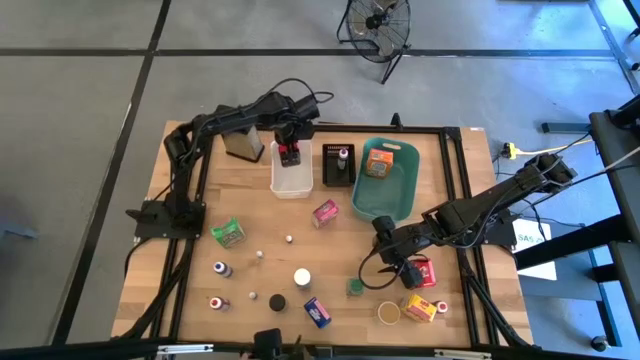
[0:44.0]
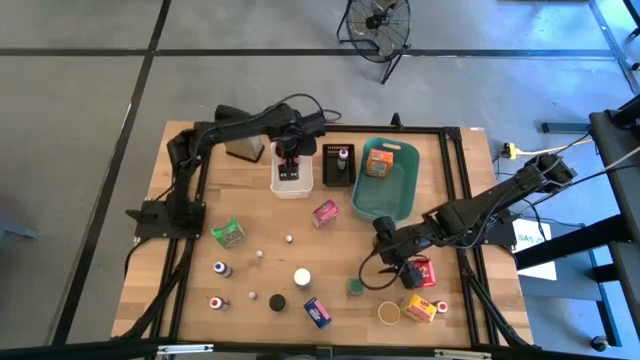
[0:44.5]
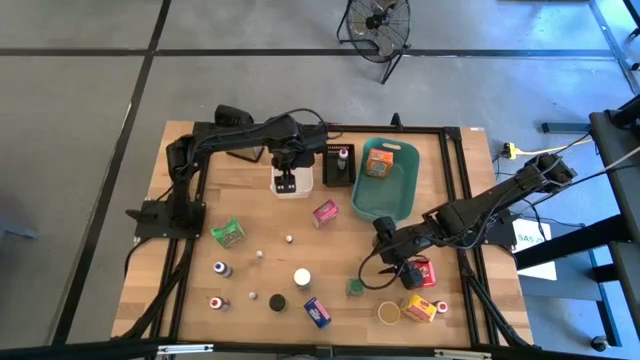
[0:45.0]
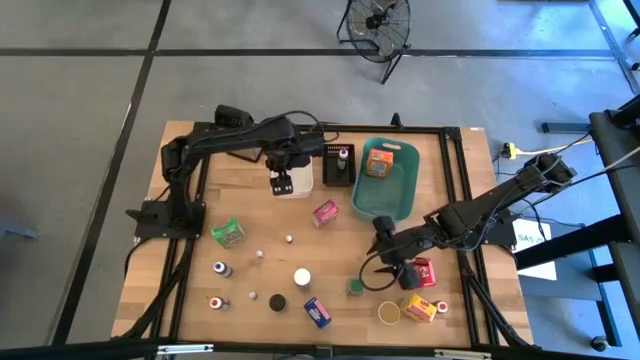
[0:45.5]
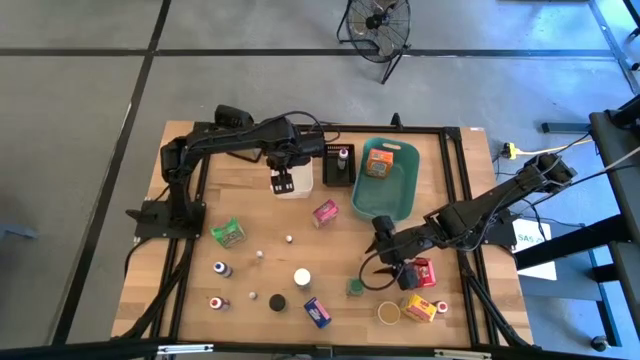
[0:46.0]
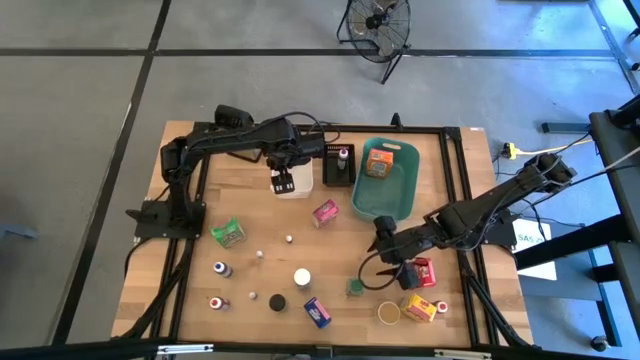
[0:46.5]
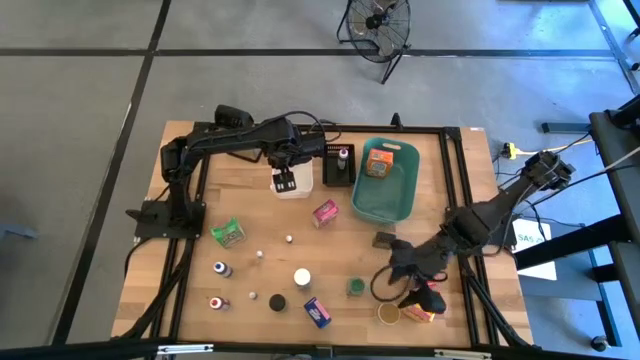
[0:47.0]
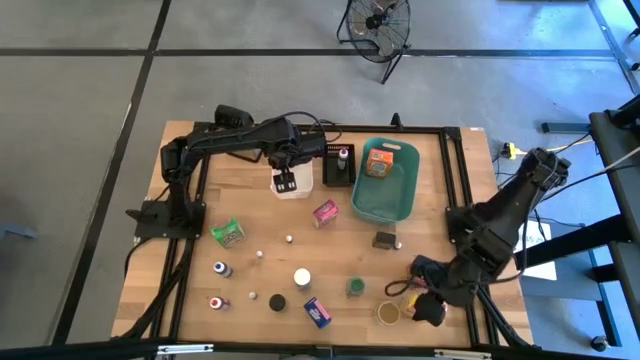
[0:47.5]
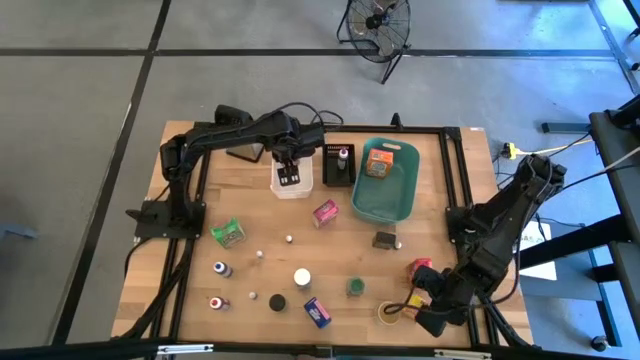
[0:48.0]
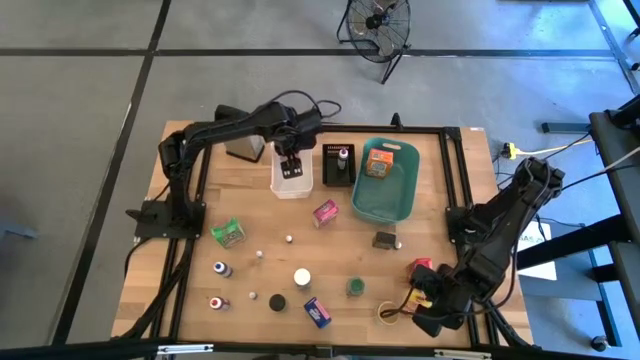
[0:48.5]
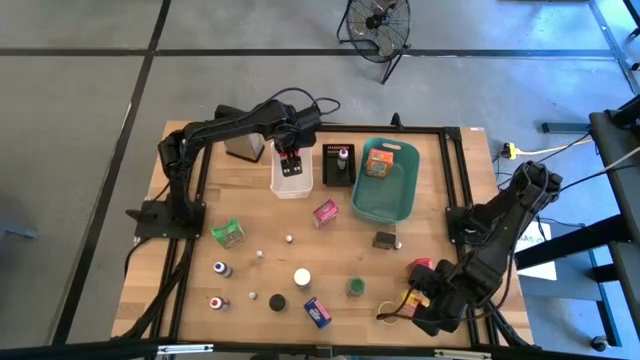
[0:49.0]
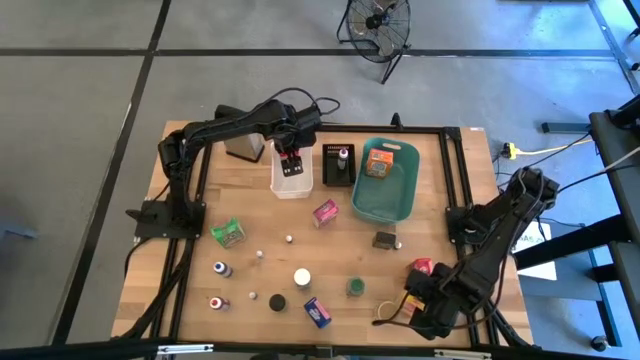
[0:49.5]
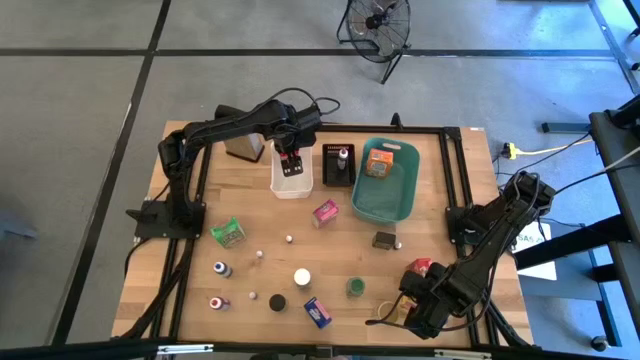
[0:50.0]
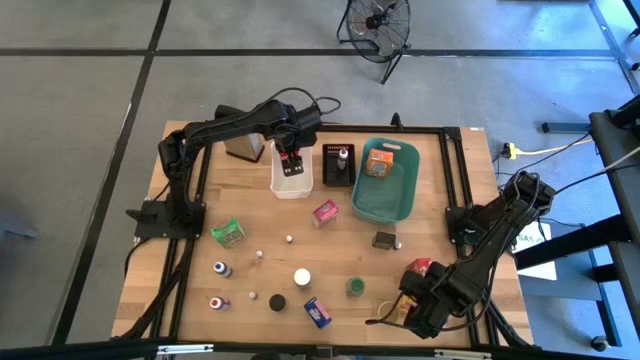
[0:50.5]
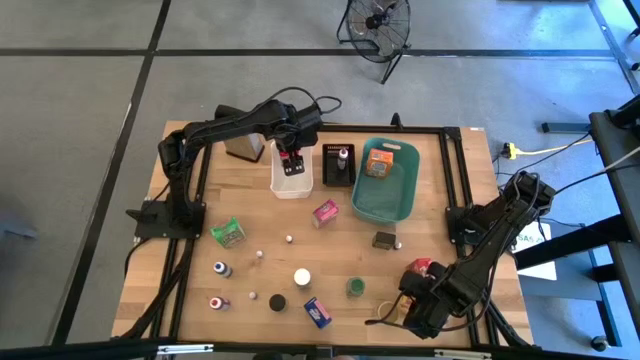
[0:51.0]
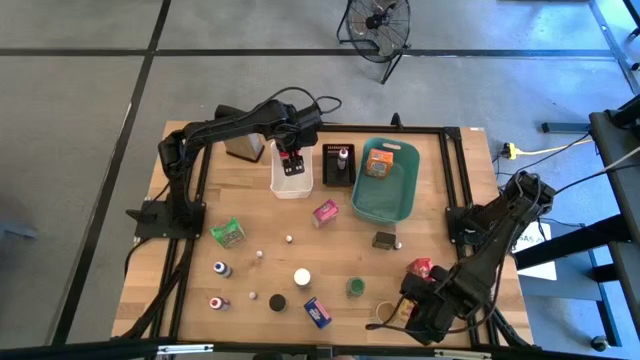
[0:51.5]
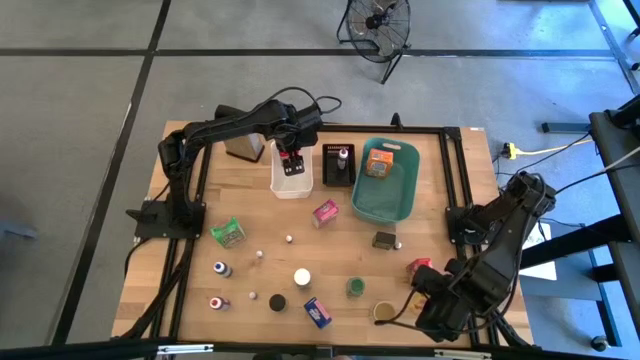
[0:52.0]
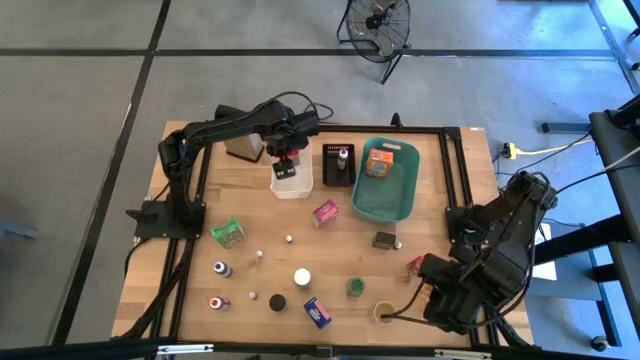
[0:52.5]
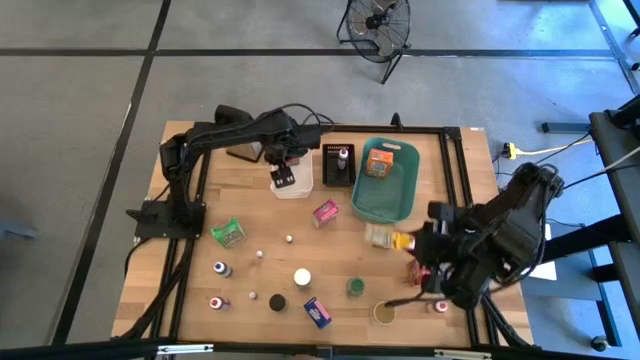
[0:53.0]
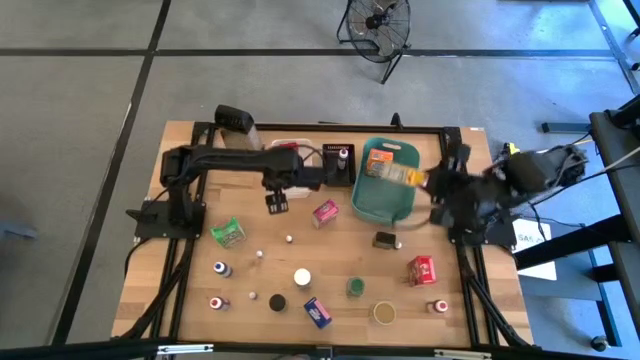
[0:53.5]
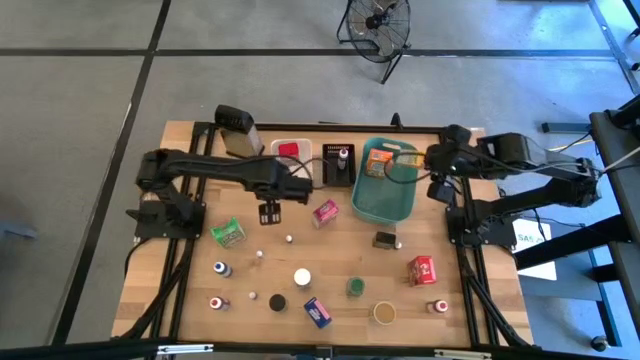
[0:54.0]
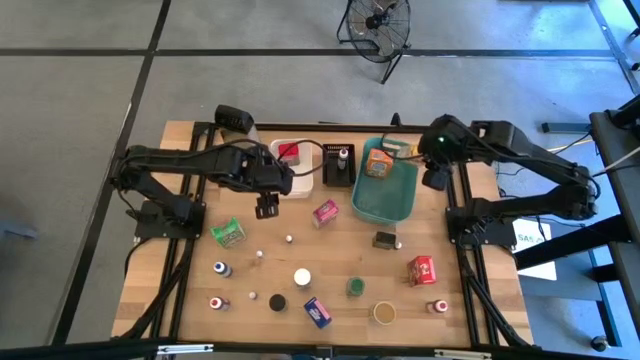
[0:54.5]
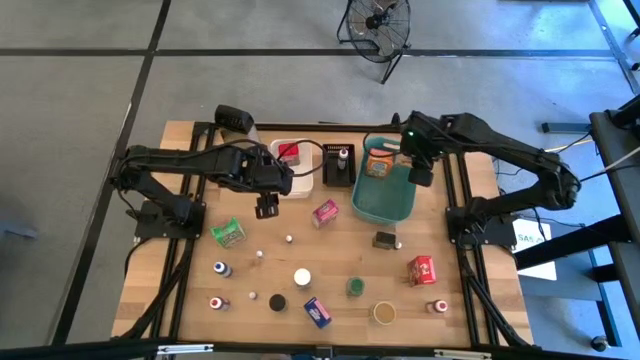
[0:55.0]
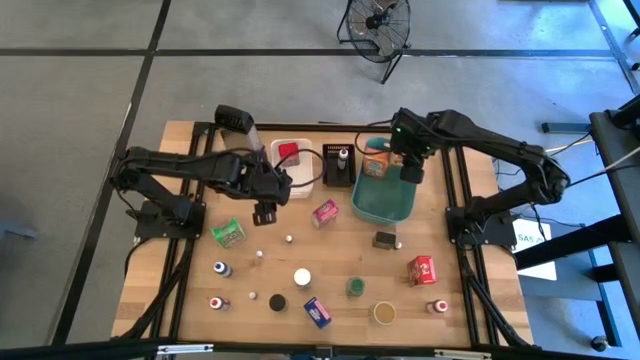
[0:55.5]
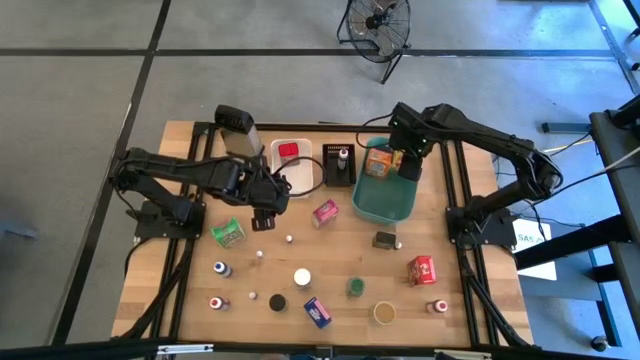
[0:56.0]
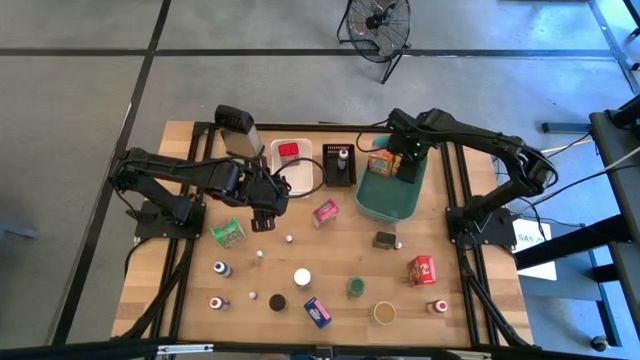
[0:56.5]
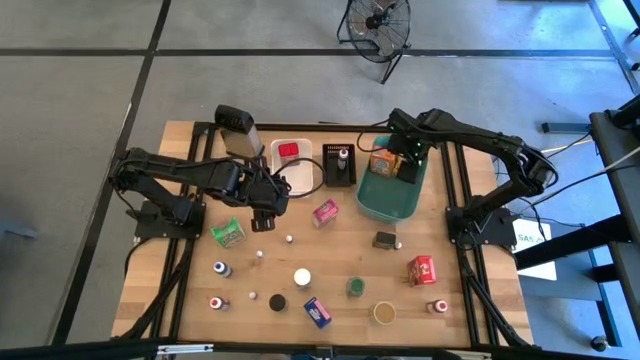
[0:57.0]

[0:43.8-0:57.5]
Task: Pick & Place Kitchen Items
Put the yellow cereal box into the green bin

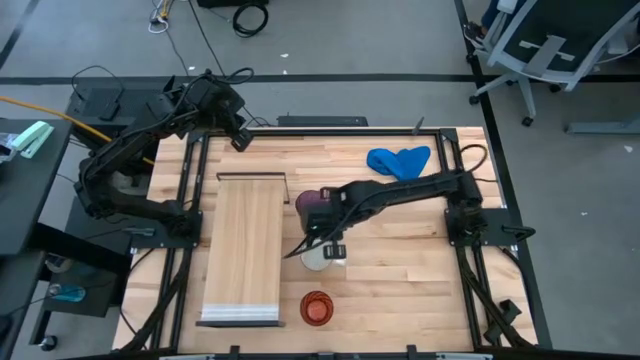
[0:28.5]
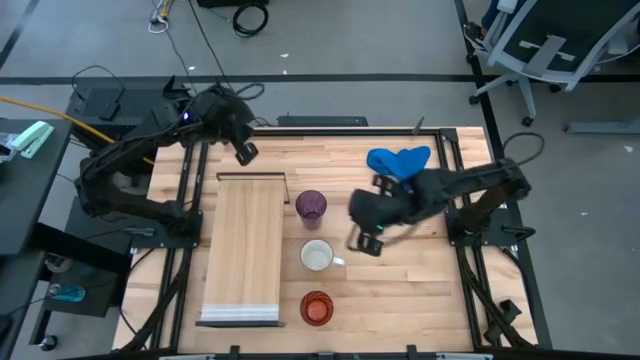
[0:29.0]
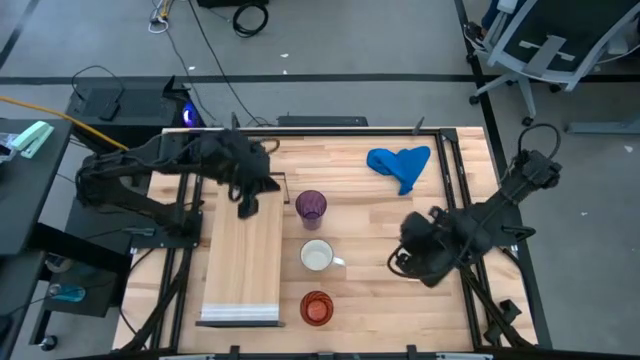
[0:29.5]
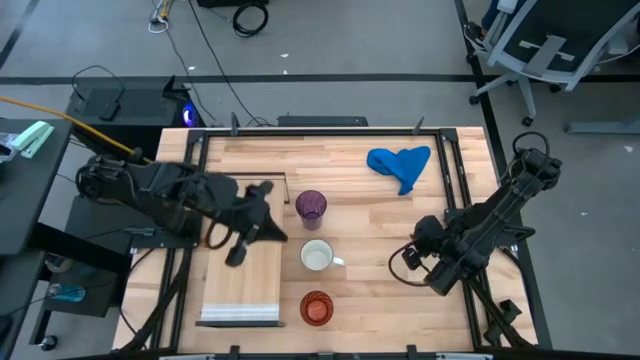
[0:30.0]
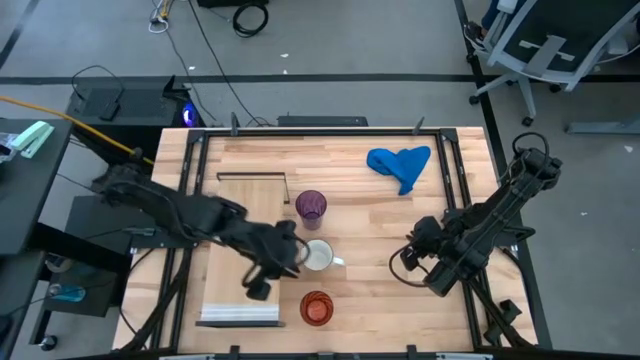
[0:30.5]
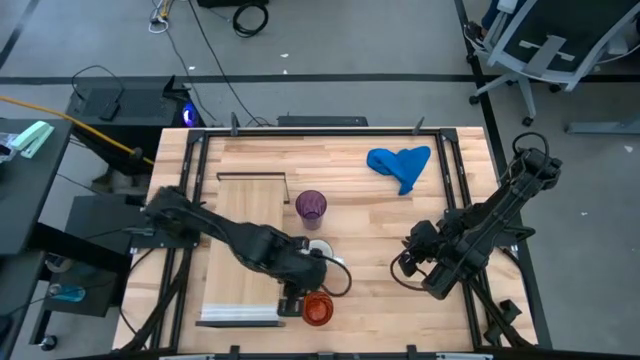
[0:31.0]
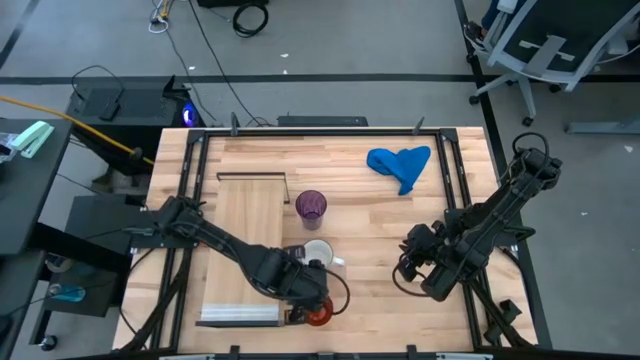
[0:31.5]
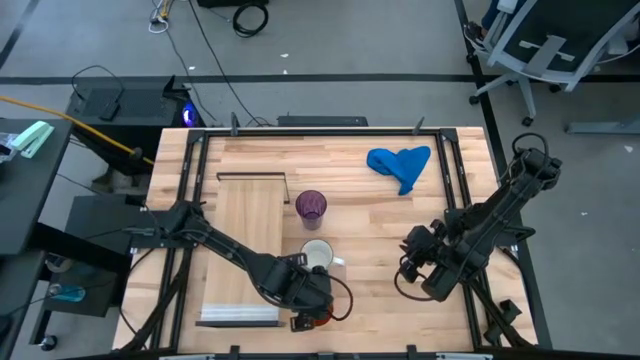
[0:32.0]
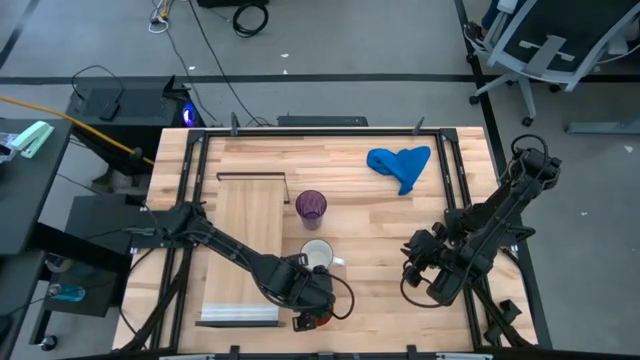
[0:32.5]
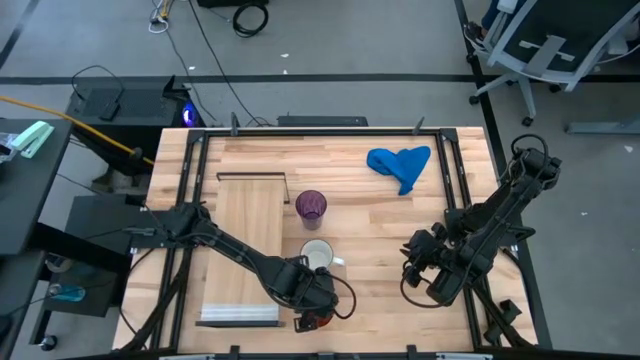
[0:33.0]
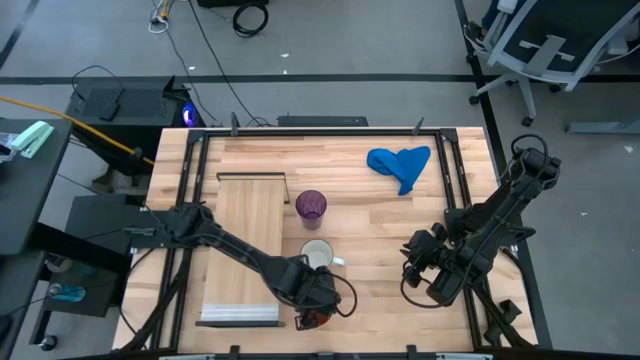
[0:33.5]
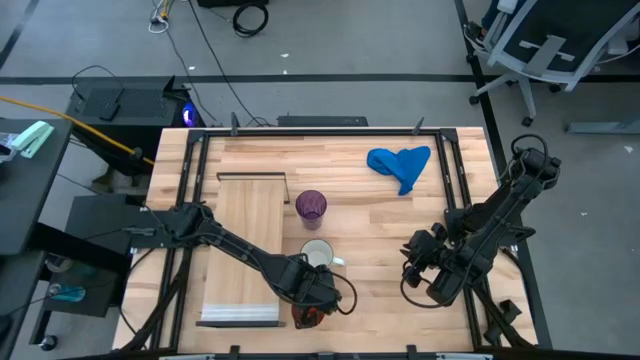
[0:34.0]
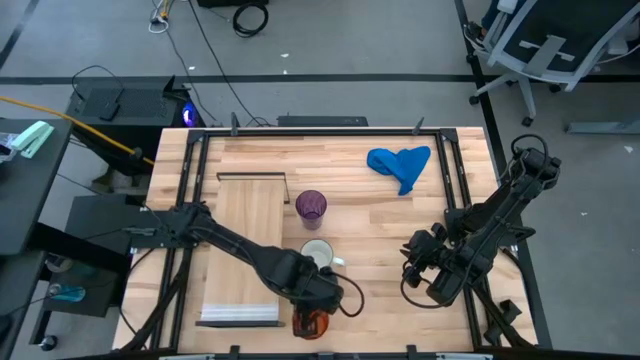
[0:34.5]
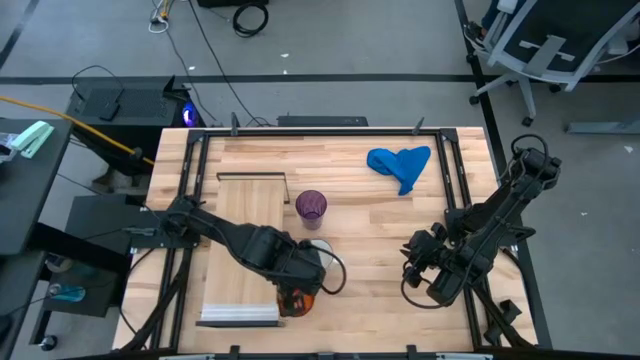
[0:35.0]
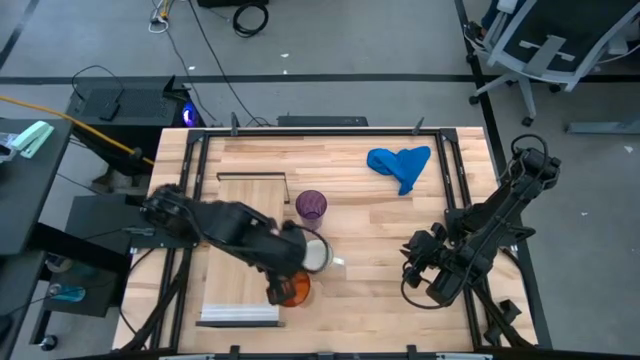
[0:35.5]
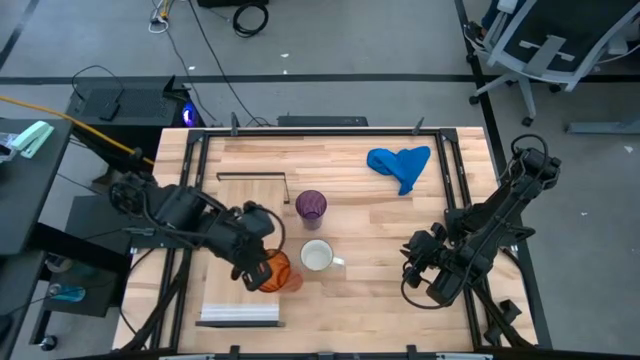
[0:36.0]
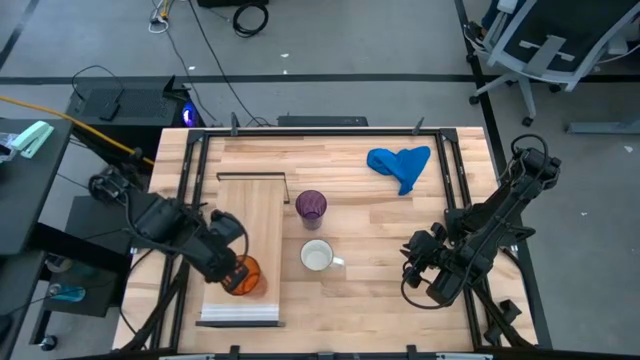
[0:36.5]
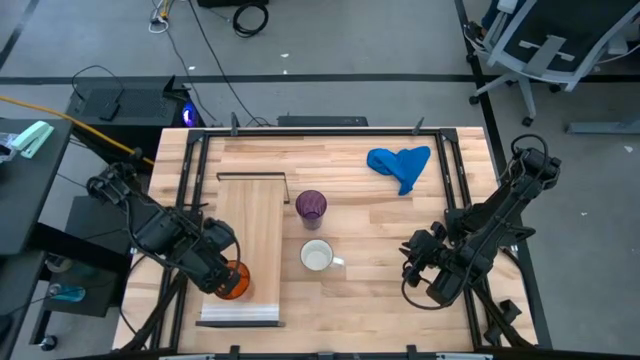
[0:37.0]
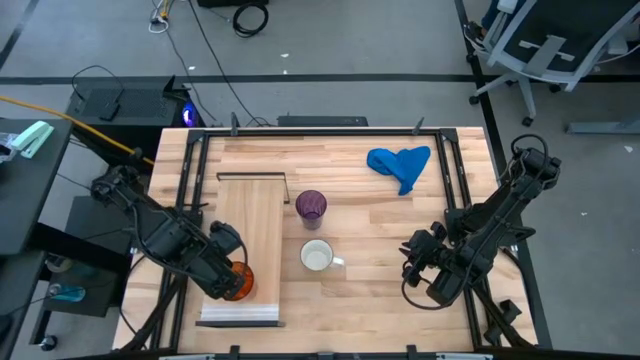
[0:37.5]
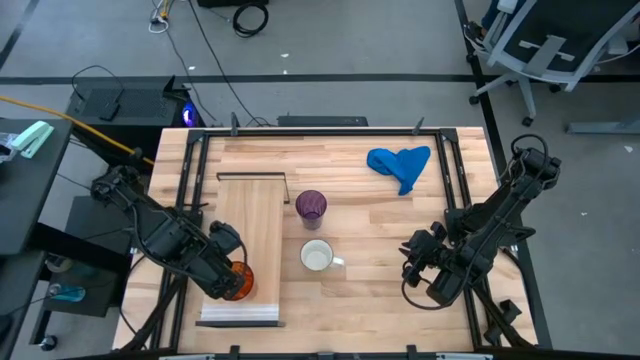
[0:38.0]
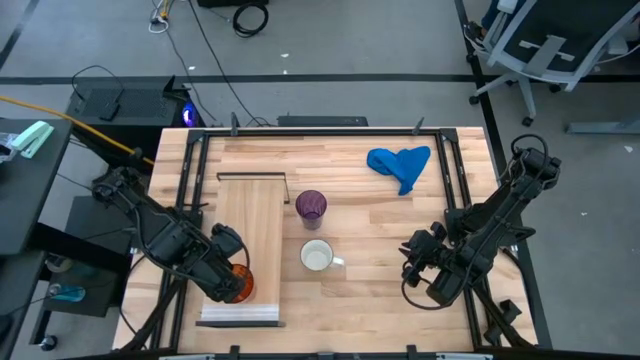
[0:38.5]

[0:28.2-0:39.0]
Task: Stack small to large cups/mugs on shelf
Put the orange cup on the shelf
